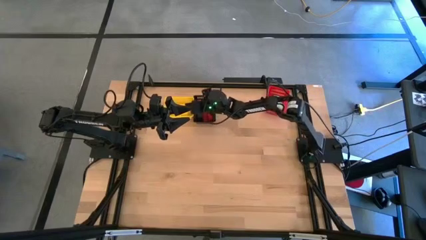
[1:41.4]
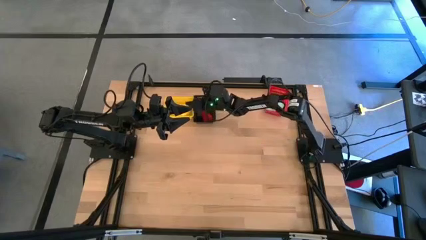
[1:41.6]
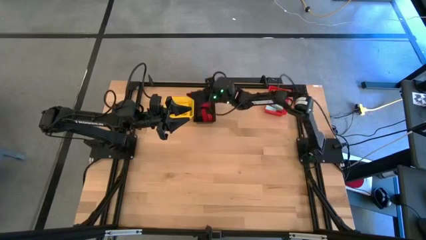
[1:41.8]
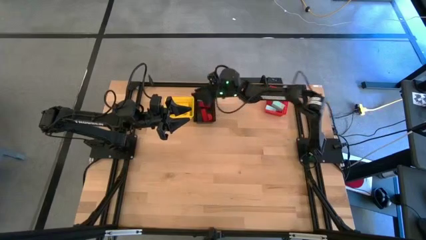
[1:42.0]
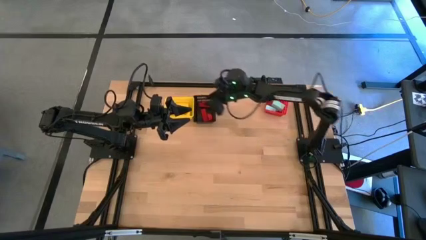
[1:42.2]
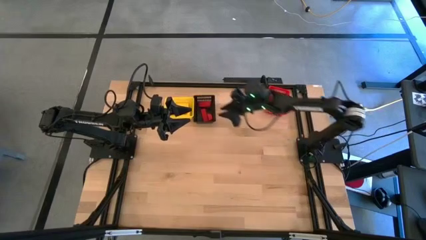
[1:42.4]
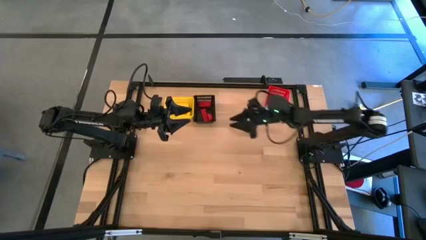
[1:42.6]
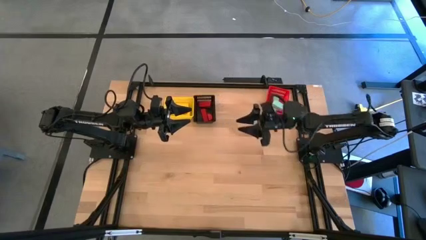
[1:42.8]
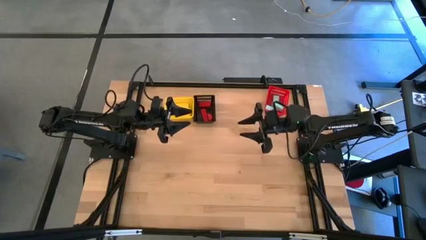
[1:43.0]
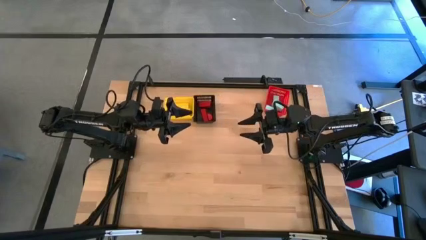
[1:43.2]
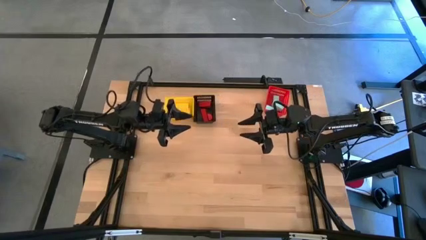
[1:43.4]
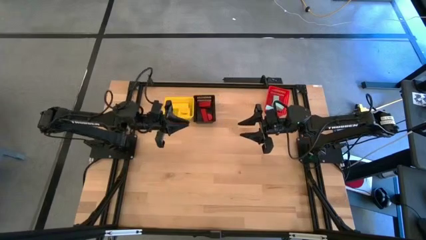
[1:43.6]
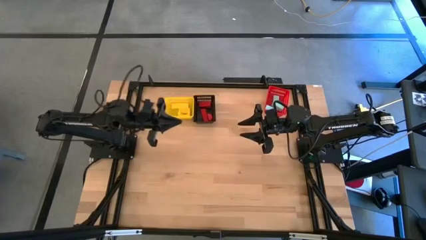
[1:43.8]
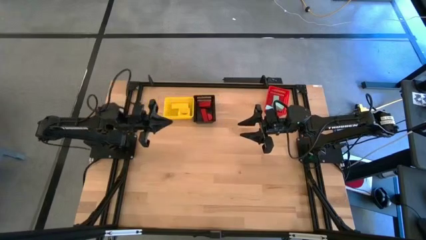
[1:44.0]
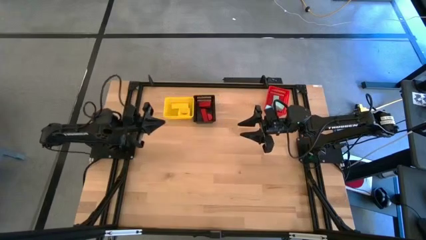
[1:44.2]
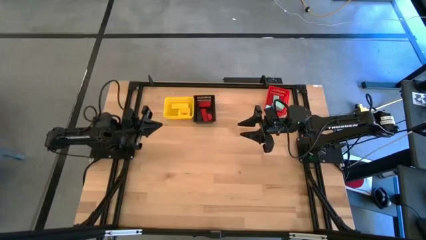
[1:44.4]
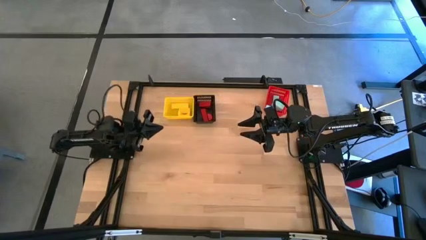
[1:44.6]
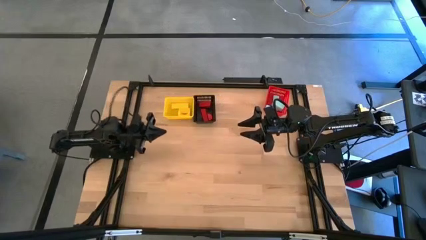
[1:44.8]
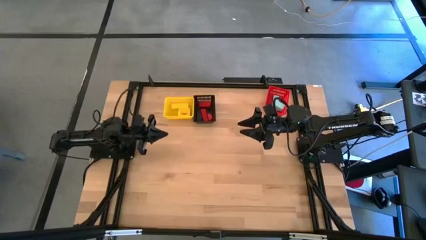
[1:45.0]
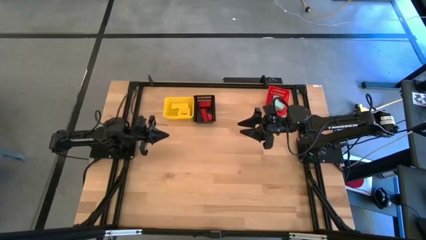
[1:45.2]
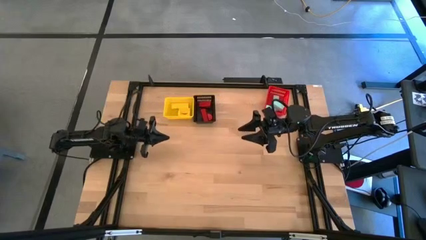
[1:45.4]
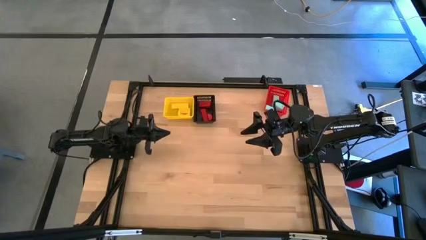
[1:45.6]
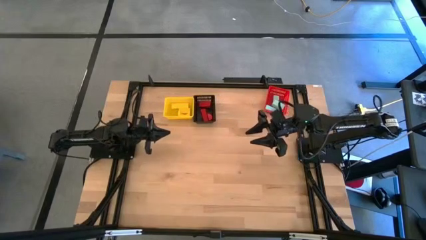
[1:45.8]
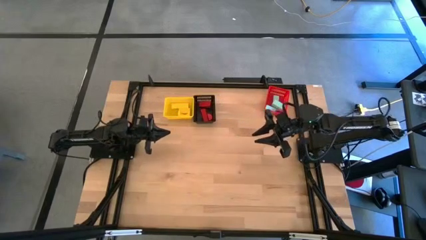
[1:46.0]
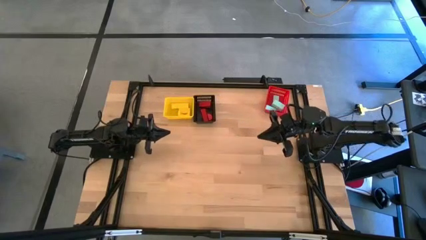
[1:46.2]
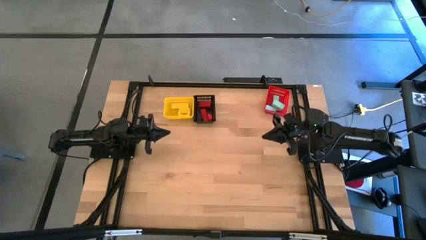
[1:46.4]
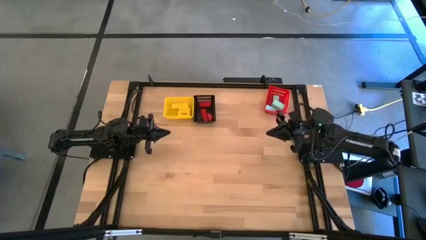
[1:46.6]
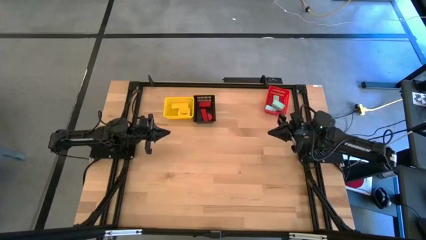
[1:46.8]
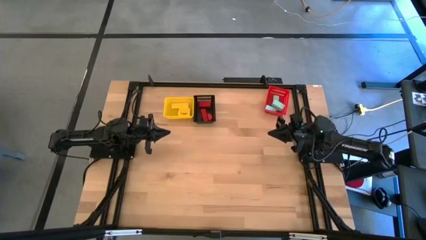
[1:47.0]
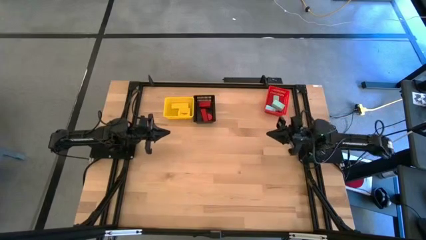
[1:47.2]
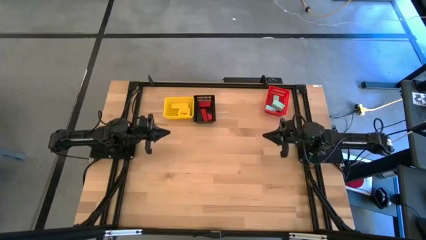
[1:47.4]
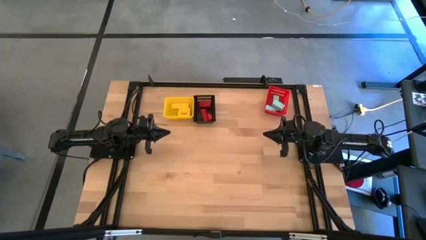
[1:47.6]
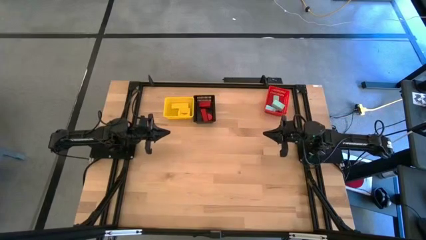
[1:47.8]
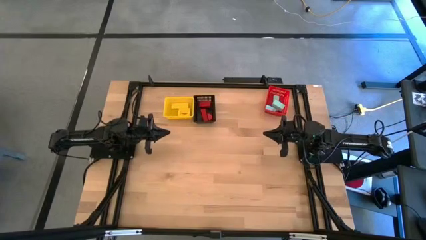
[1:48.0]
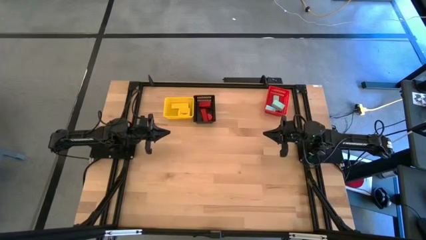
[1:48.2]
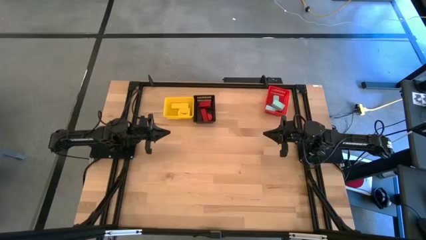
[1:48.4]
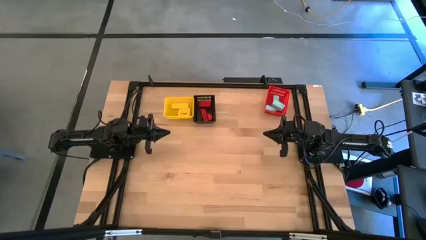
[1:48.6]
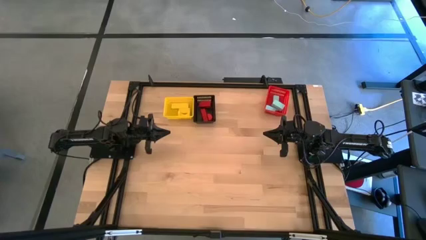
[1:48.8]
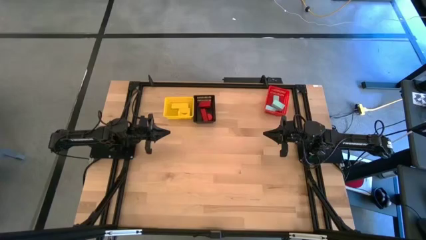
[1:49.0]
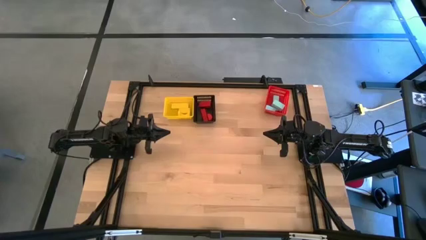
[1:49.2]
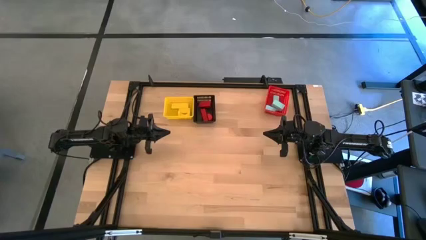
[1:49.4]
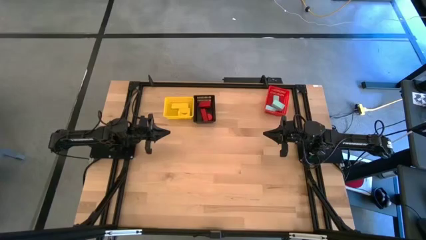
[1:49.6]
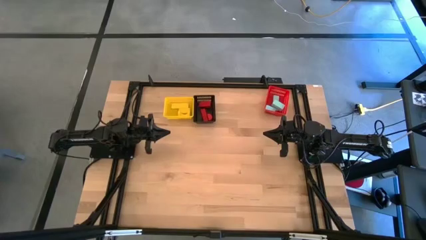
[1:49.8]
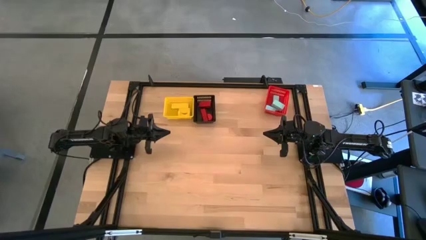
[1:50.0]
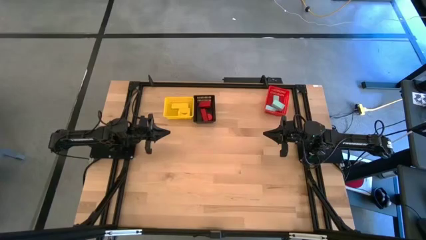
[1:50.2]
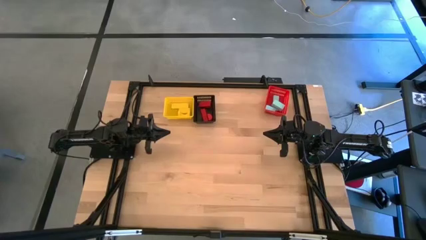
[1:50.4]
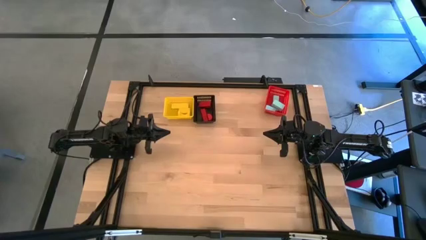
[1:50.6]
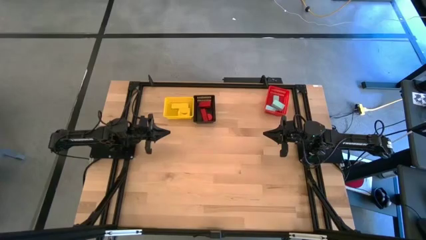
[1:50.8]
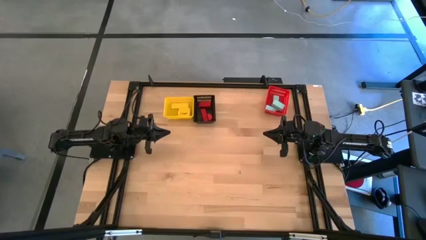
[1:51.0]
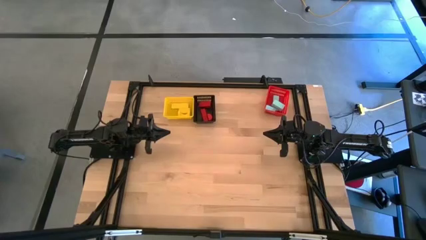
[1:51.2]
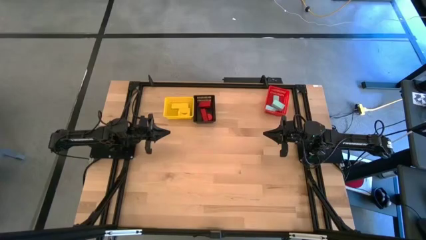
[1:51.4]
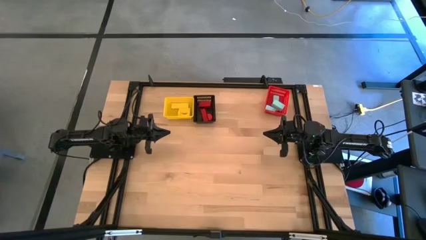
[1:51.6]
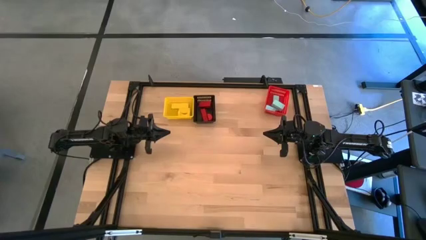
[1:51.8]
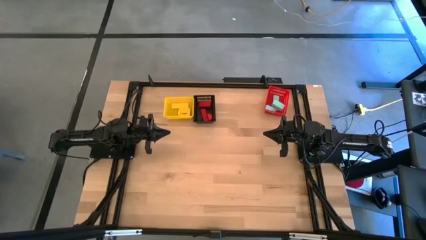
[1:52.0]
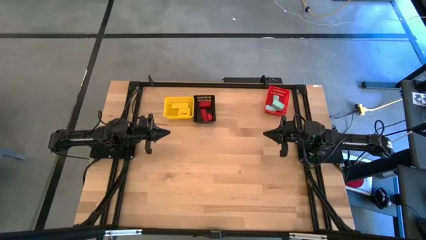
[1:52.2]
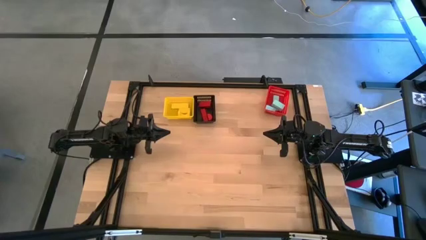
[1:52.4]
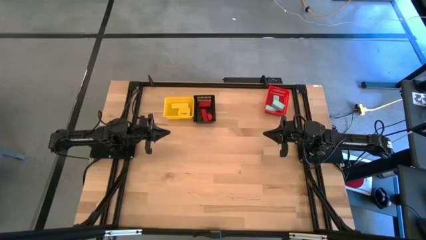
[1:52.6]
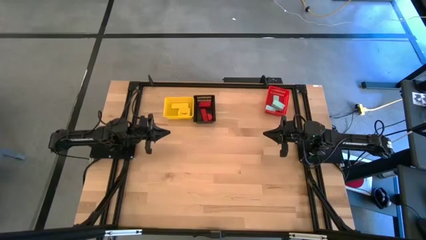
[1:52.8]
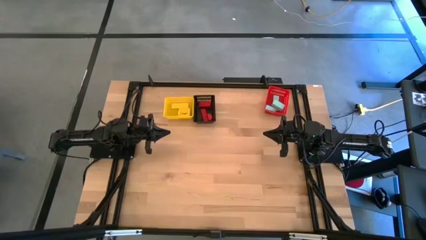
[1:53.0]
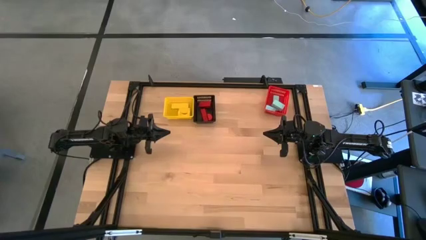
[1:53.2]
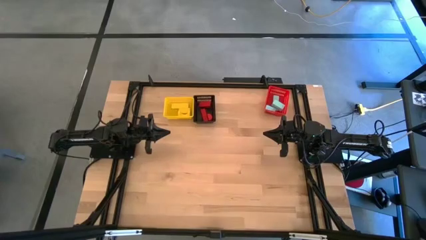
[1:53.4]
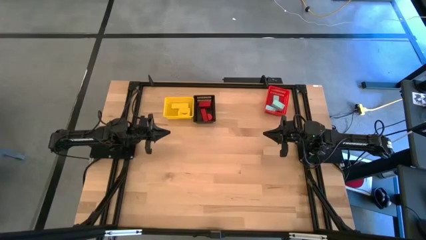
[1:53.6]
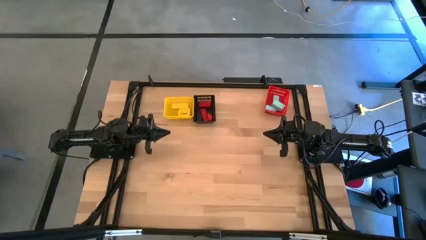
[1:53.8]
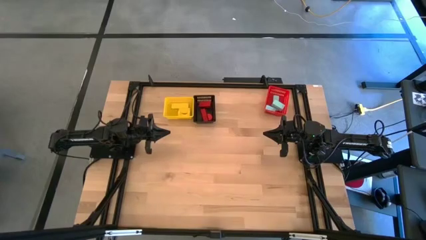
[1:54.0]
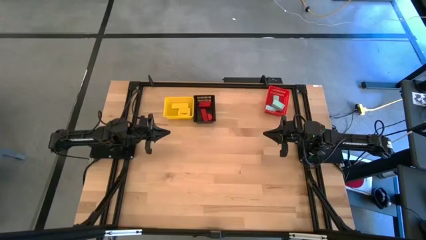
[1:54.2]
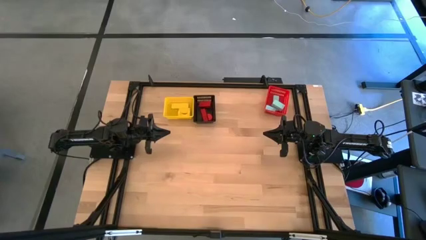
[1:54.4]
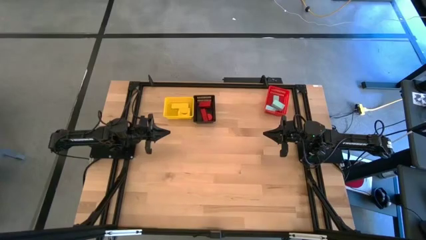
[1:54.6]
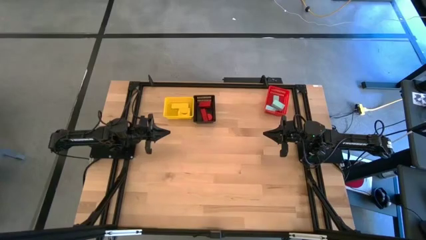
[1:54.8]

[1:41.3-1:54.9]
Task: Sort & place blocks by color
Return to Home Position

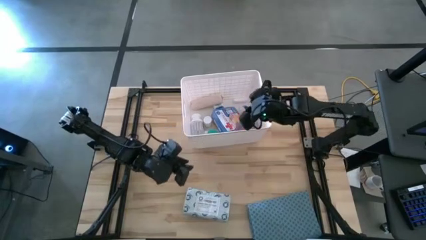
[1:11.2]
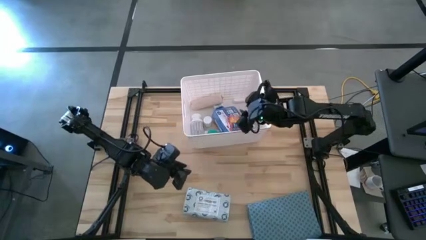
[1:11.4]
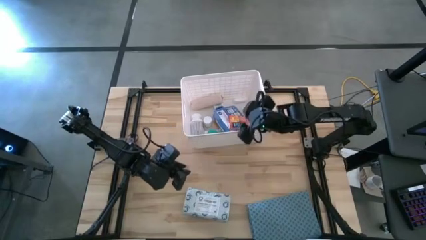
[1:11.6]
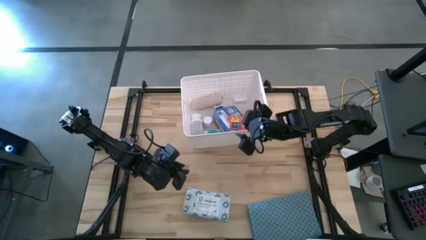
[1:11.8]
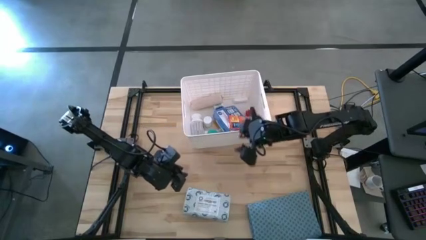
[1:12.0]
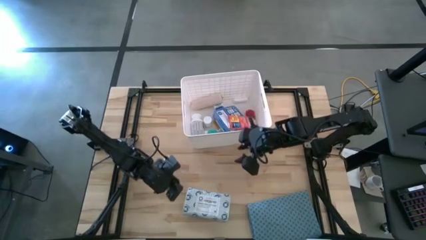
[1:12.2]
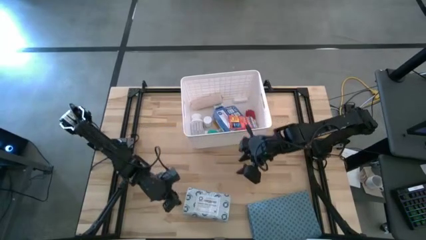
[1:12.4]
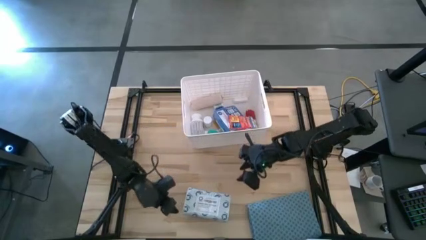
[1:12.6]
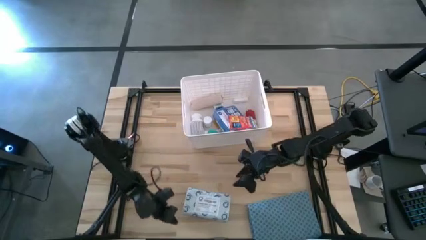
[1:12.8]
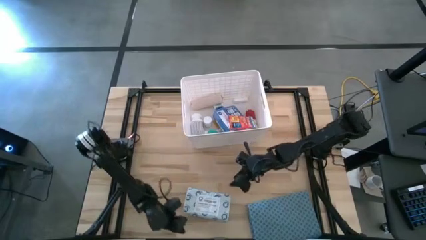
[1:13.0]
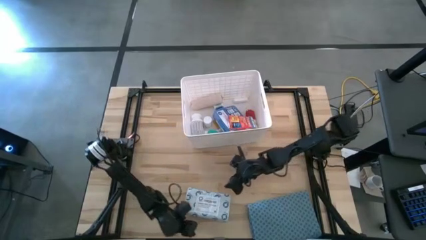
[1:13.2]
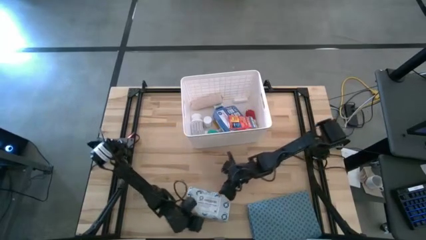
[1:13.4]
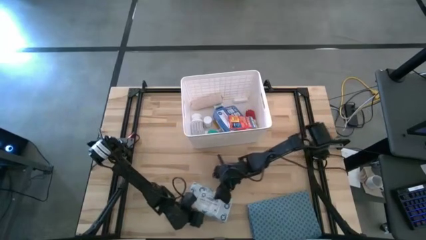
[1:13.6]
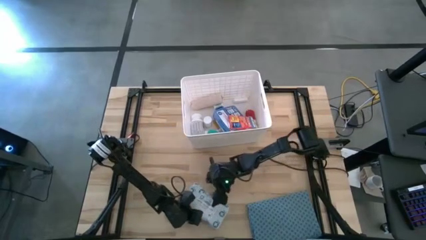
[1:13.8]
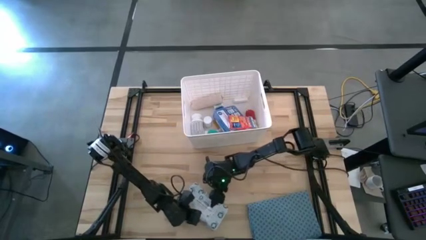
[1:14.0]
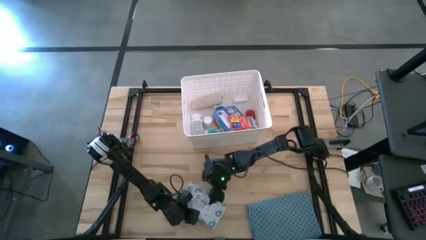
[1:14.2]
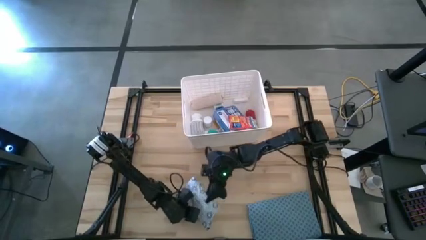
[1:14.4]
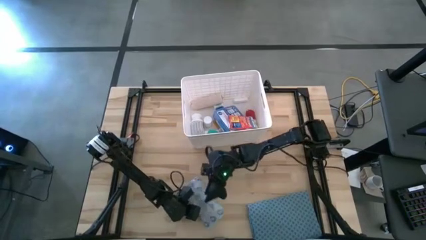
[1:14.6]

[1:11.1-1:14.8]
Task: Pick & place medical supplies in basket/bin
Put the white mailer bag into the white bin
